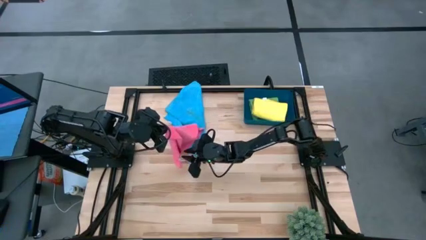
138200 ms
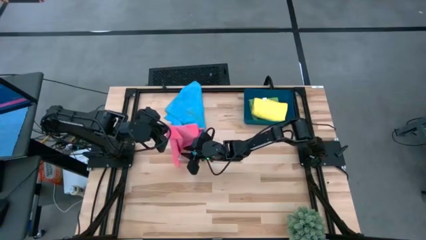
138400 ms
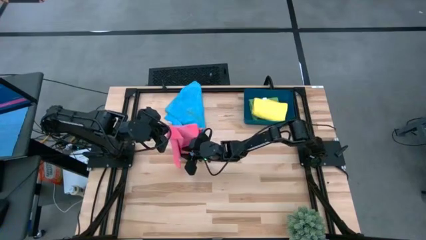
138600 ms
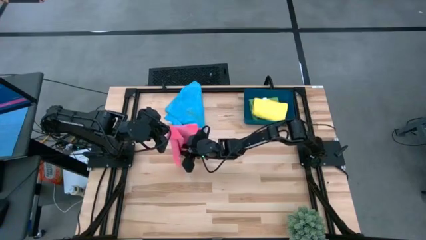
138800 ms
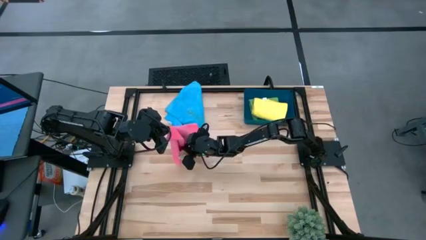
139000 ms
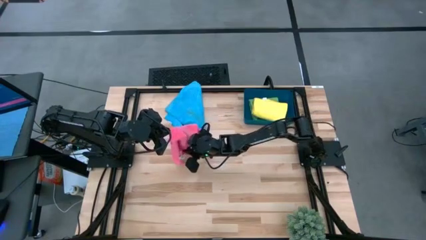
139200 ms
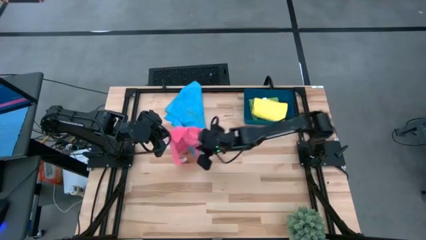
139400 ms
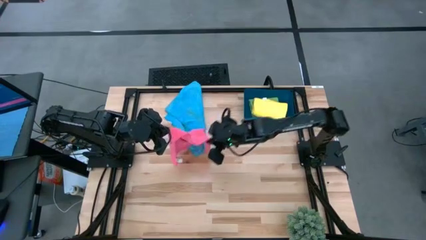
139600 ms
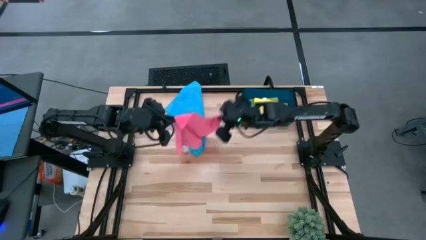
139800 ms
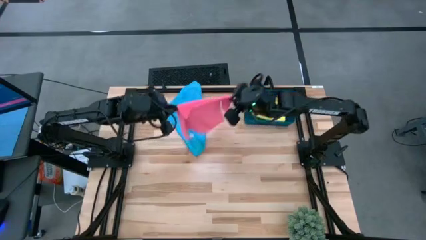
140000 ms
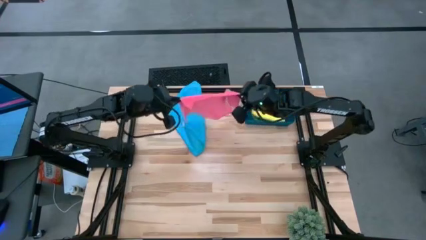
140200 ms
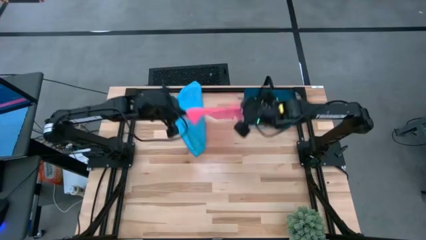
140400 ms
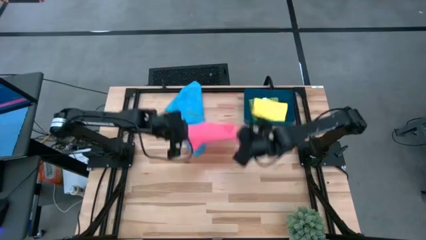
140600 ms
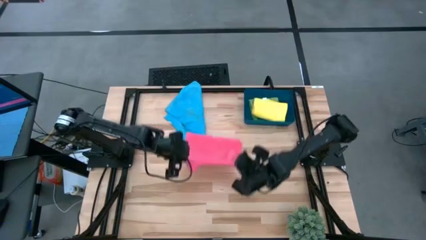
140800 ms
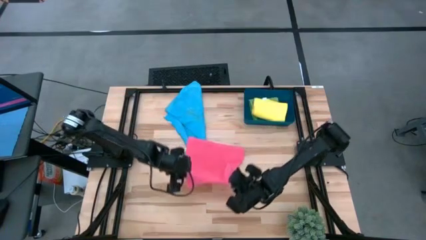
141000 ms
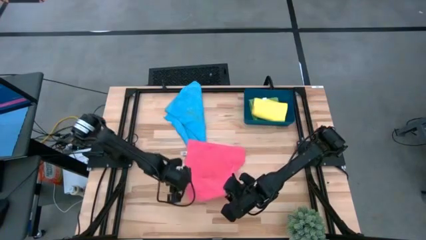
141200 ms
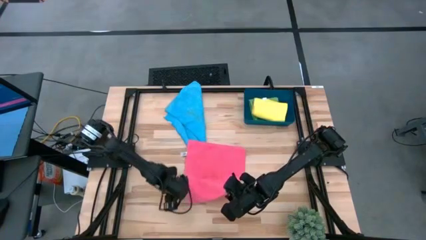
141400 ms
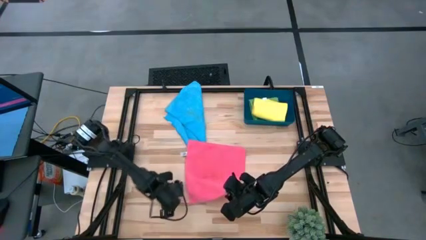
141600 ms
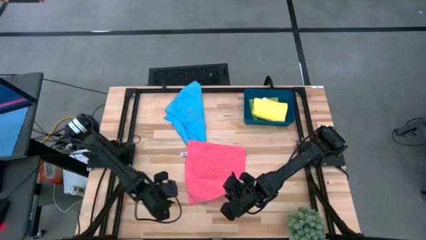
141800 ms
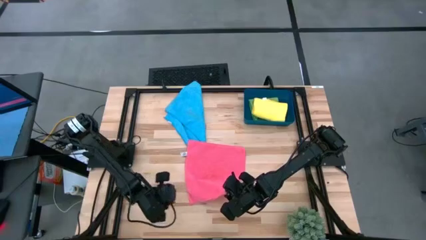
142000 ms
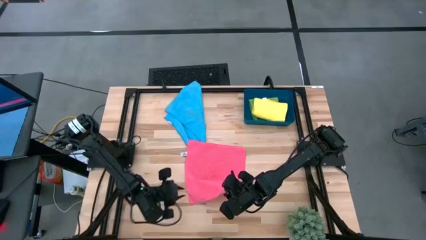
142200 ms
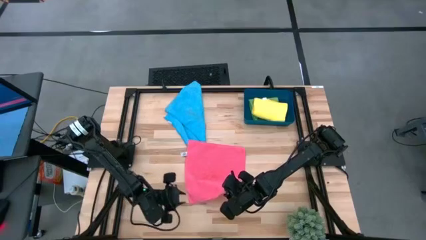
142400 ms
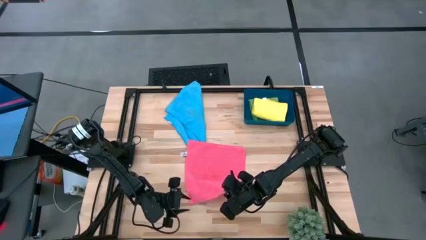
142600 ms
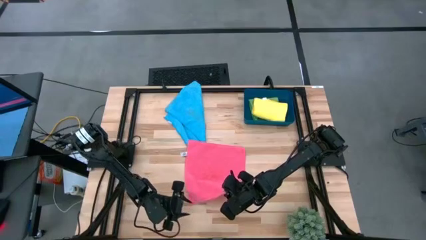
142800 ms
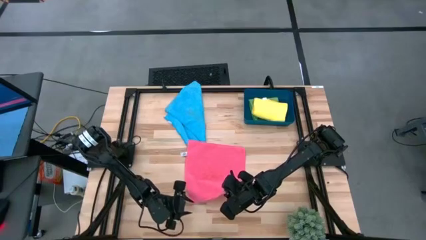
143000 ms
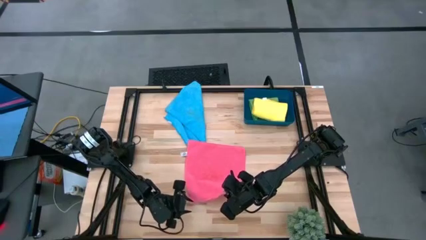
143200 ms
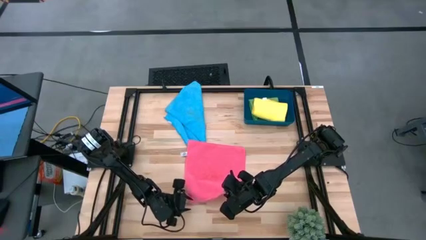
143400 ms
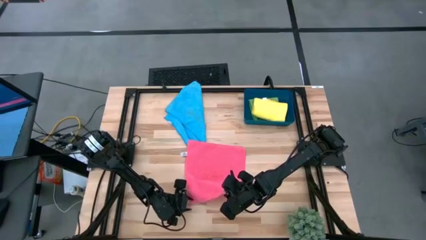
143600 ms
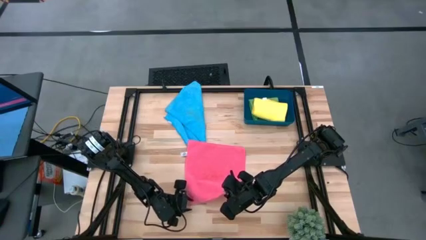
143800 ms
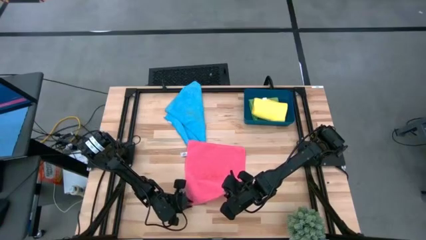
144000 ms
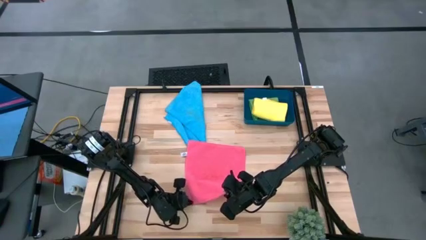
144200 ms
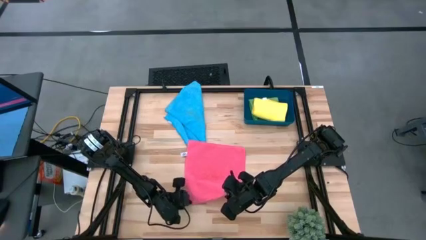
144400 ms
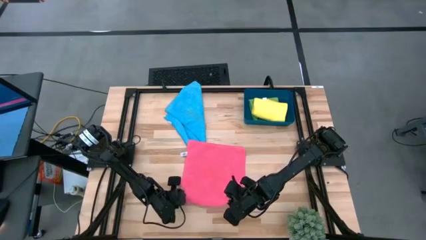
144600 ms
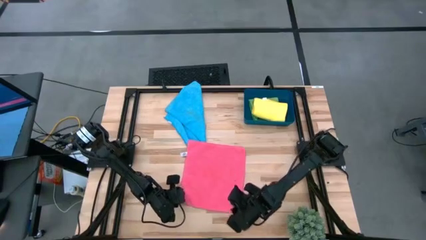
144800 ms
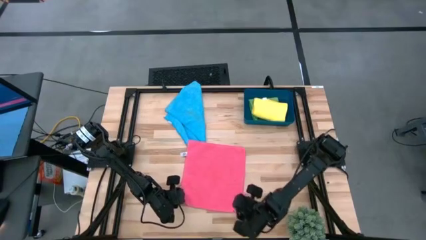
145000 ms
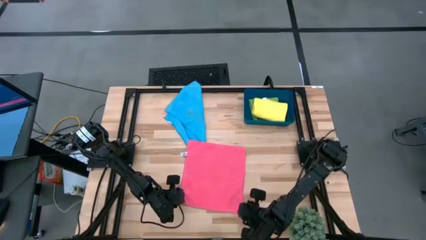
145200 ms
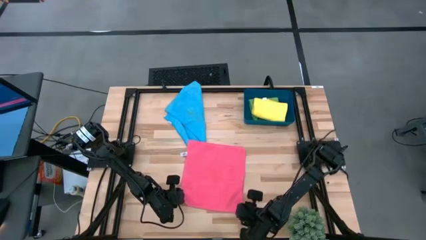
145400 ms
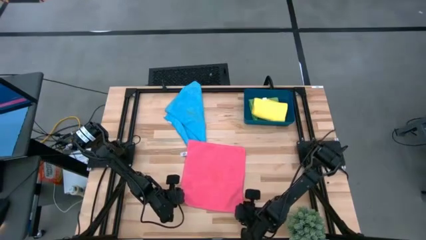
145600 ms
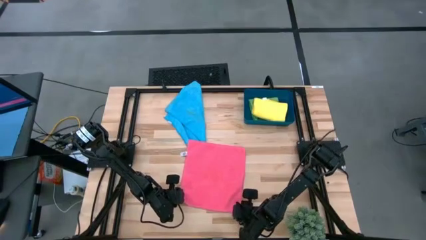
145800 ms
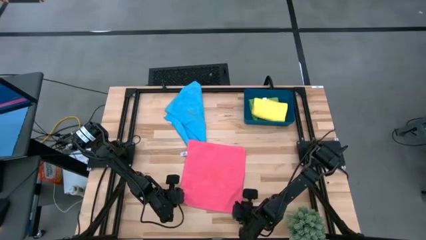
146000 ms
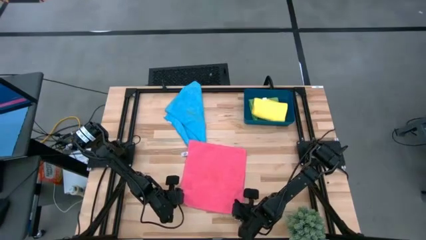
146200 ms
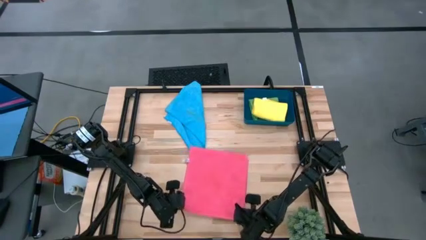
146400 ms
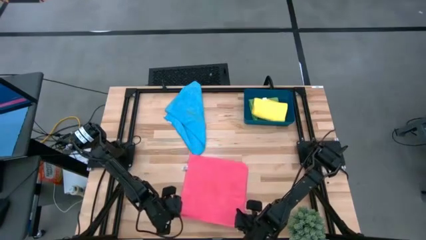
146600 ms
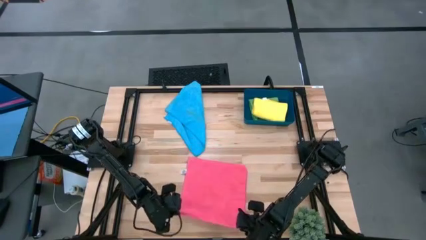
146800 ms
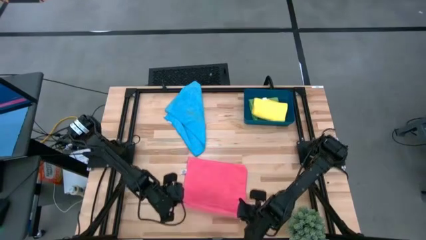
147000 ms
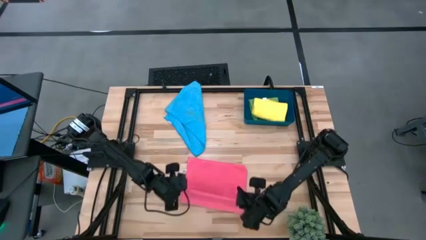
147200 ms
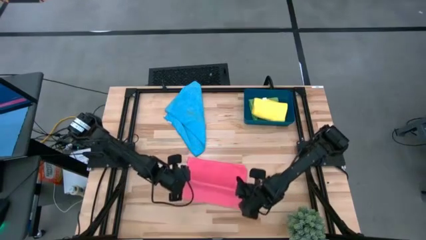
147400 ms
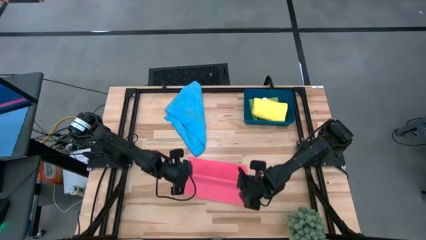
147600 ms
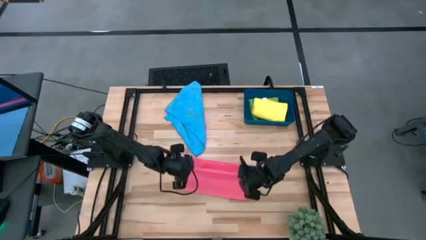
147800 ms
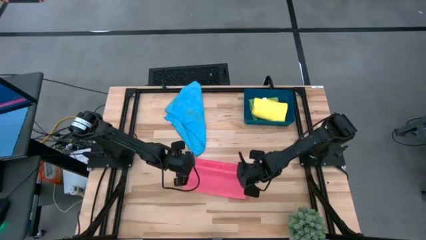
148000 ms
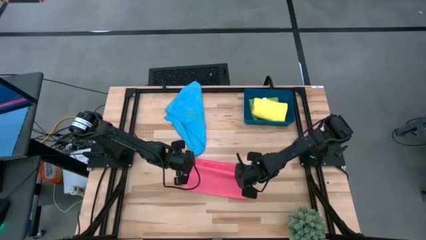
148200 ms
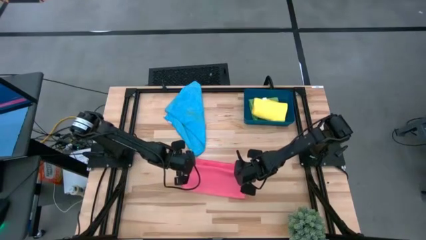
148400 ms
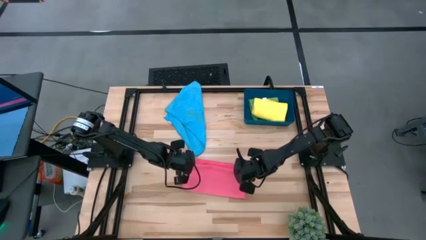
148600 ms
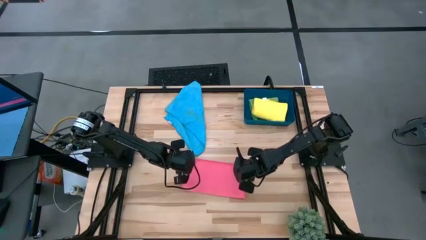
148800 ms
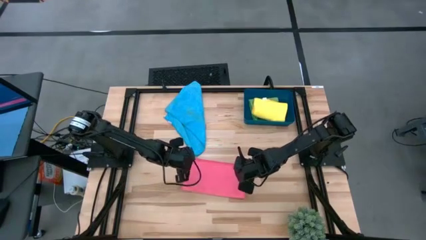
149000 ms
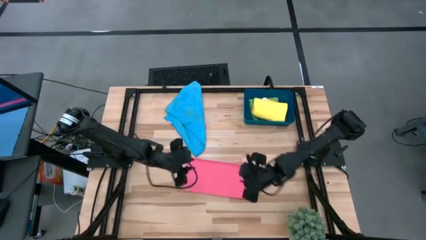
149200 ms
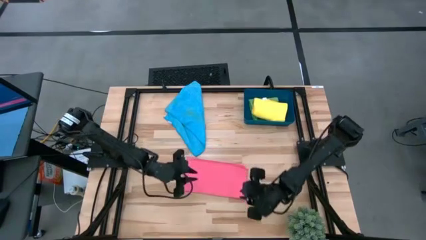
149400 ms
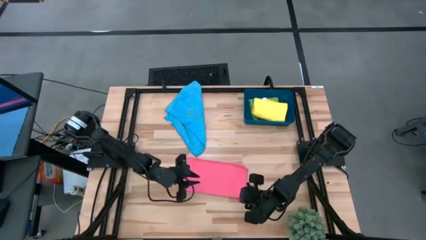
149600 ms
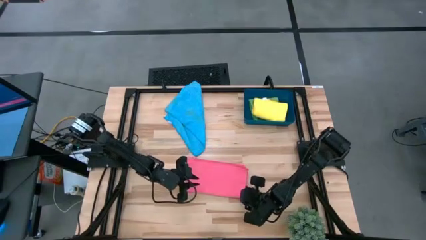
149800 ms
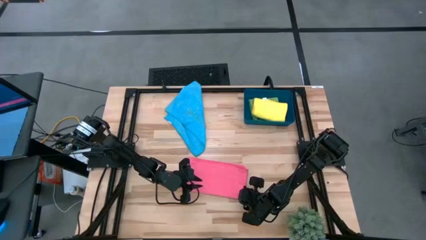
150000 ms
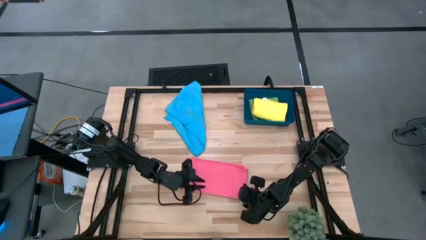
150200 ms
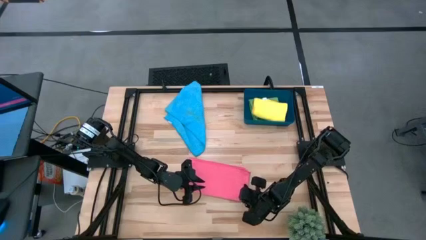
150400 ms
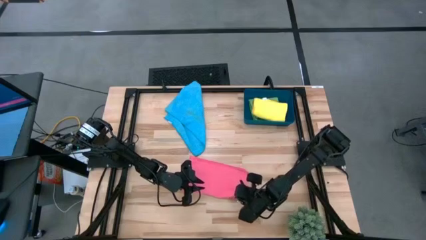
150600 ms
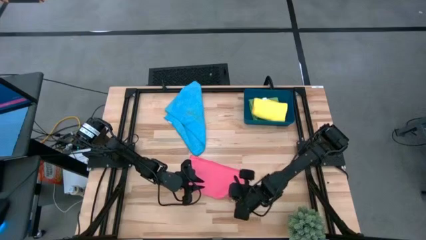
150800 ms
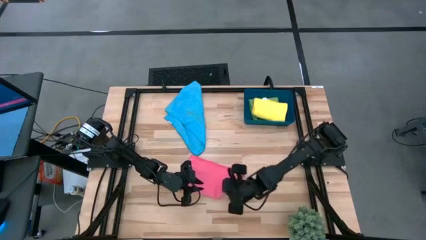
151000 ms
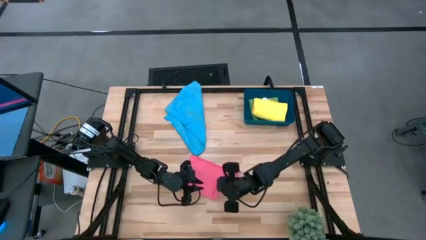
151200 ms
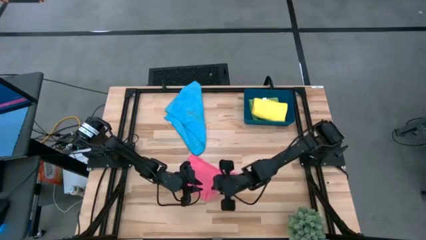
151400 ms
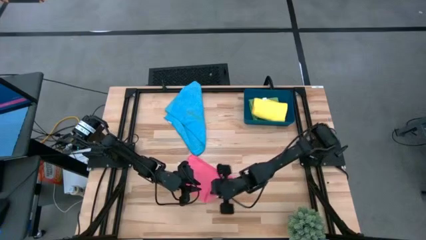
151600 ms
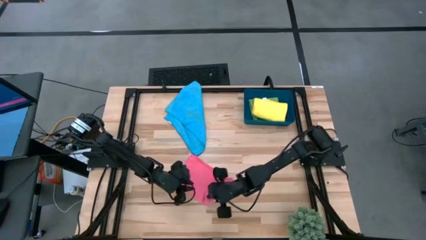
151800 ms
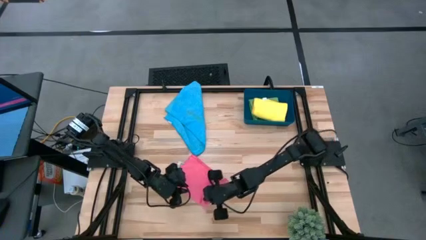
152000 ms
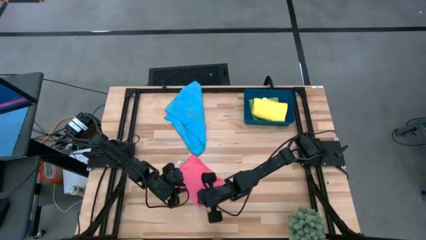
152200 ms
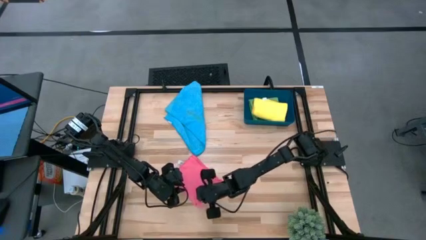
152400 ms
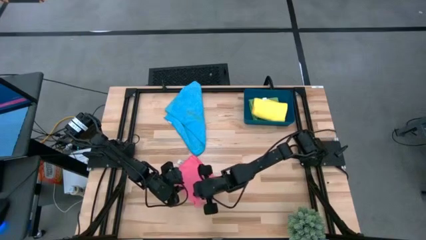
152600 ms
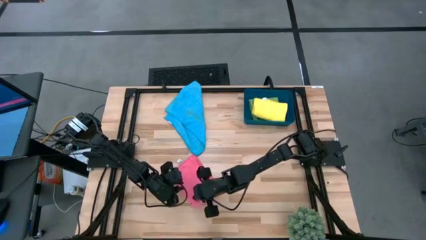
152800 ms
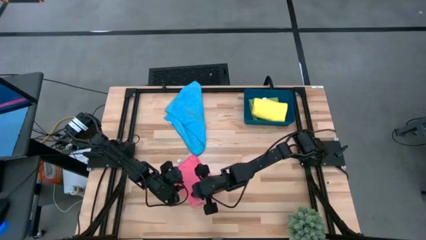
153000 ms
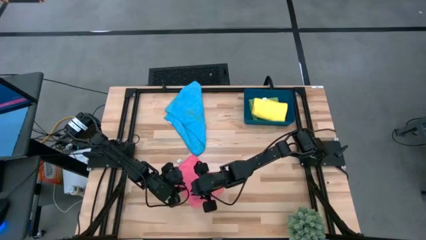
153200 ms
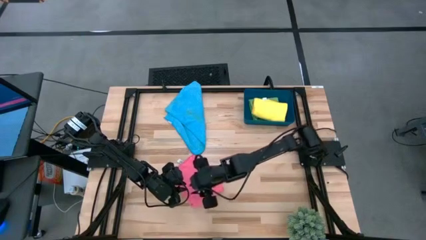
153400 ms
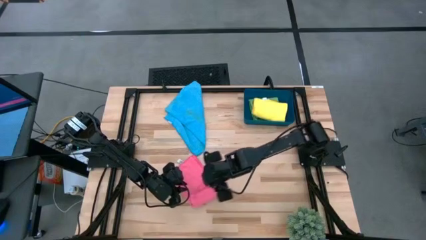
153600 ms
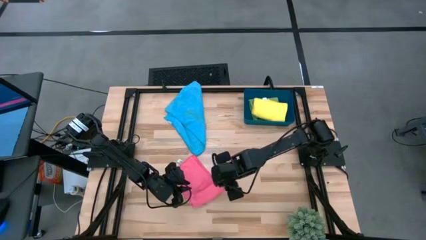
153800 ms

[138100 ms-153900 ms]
Task: Fold microfiber towels
Fold the pink microfiber towel

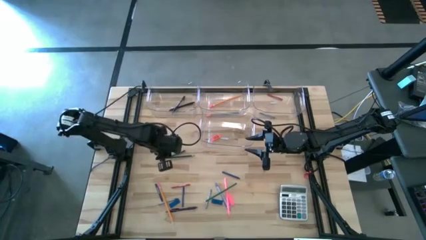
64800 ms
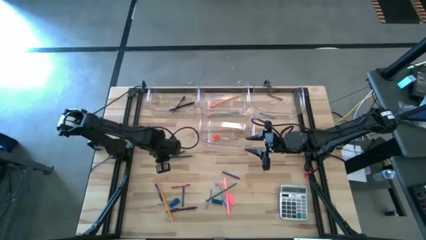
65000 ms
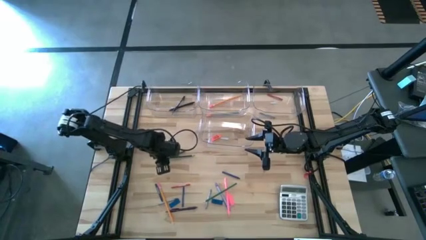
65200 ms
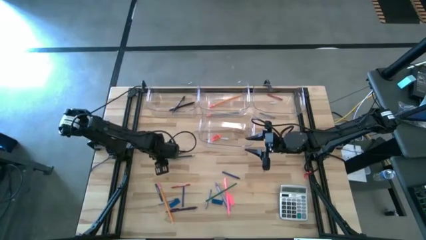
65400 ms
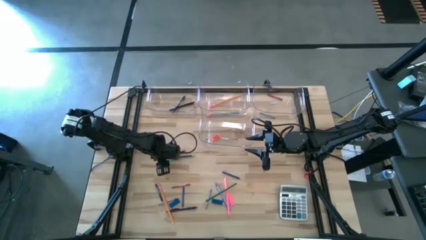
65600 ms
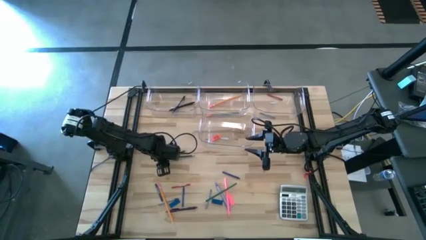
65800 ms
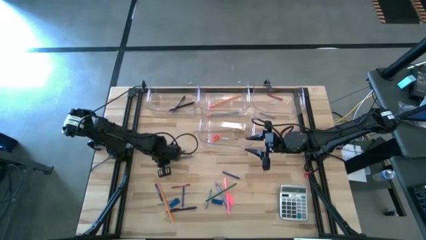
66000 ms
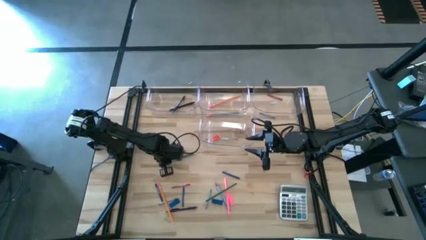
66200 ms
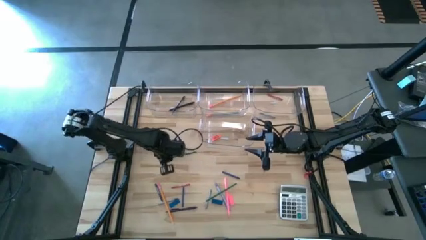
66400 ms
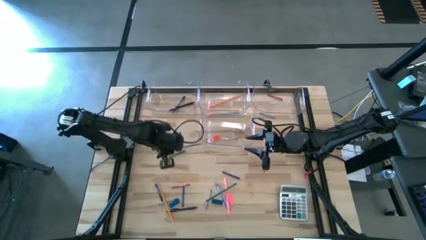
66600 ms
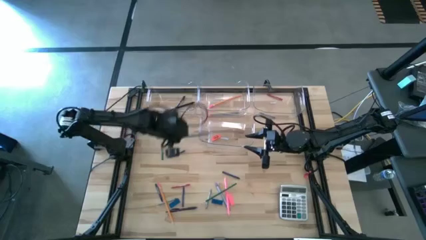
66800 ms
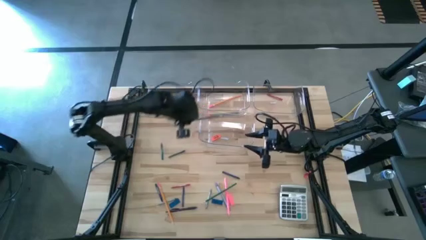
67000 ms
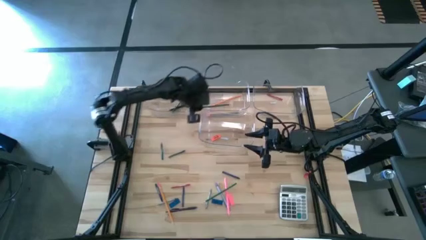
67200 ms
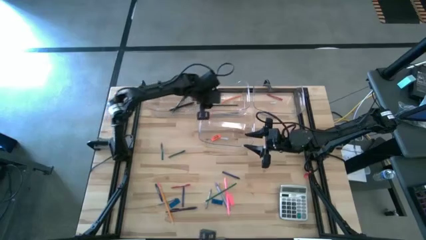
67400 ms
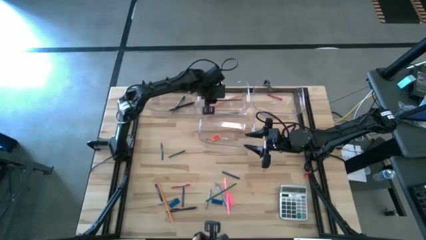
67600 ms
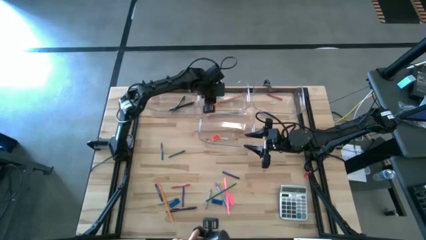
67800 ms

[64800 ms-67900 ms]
Task: Sort crayons/erasers/pens/pencils in bins
Put the green pencil into the top center transparent bin
